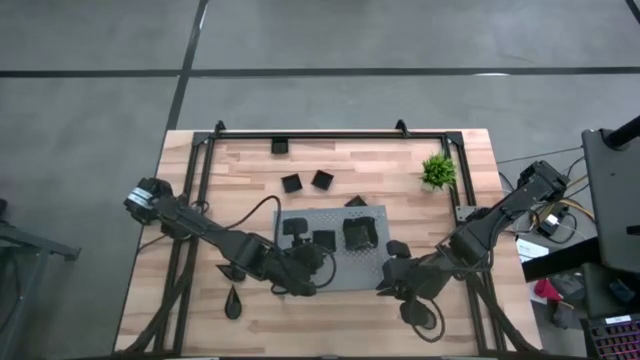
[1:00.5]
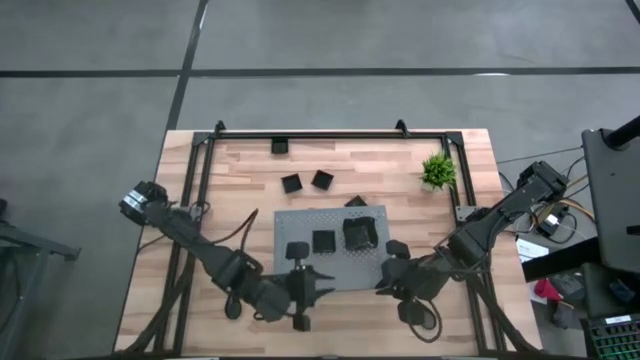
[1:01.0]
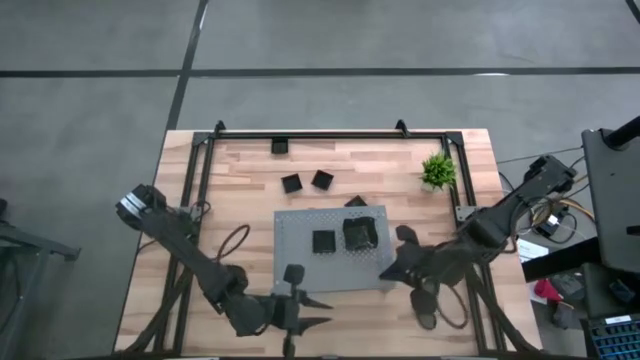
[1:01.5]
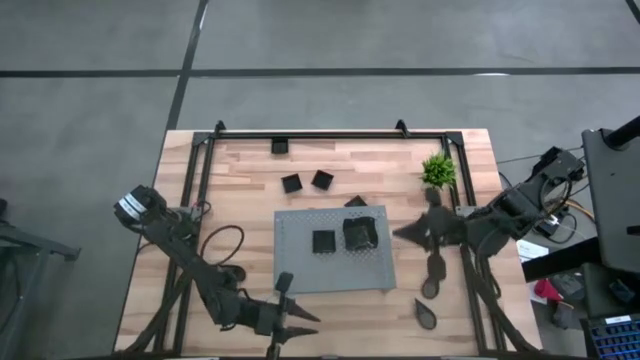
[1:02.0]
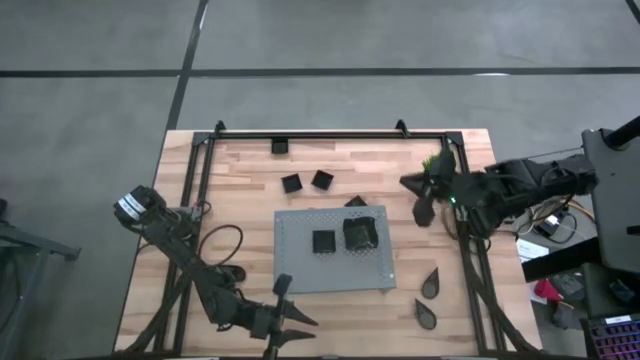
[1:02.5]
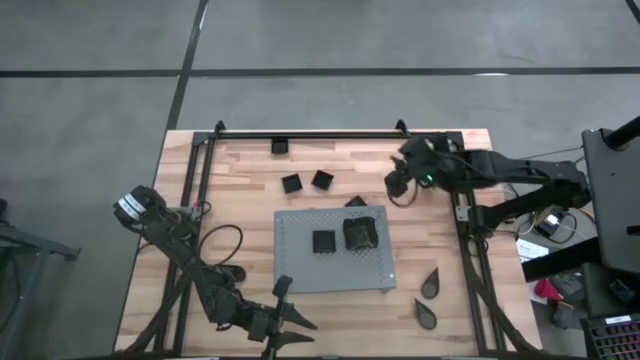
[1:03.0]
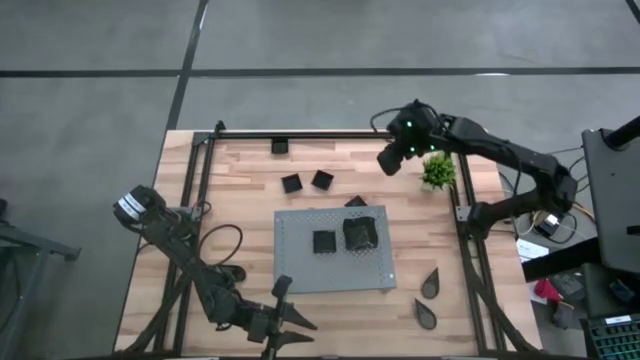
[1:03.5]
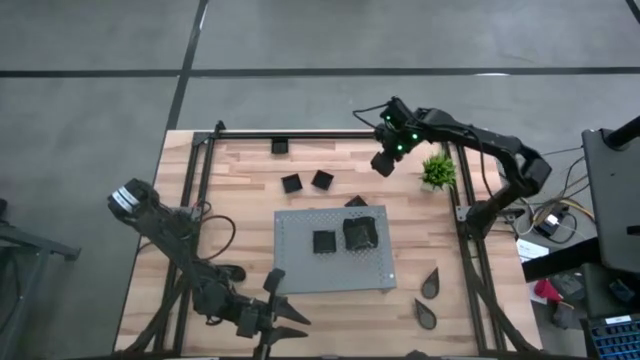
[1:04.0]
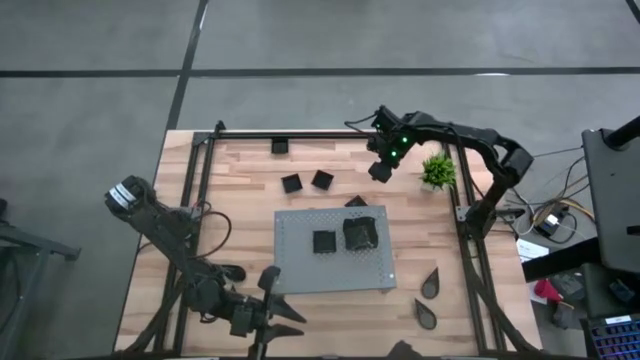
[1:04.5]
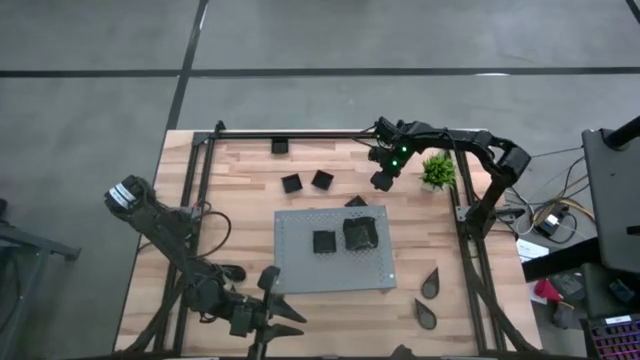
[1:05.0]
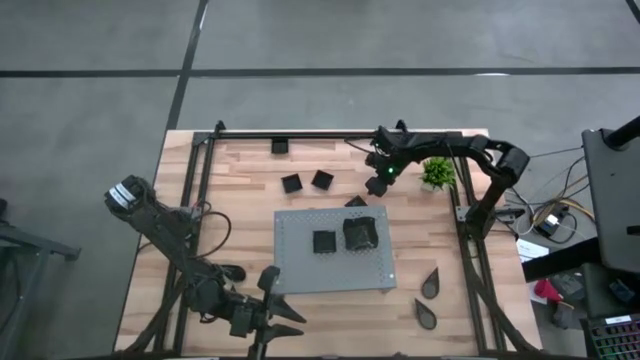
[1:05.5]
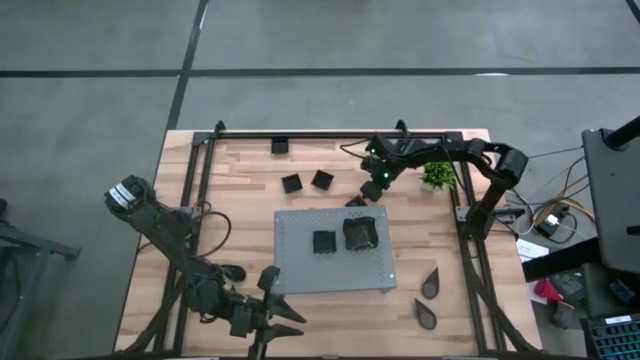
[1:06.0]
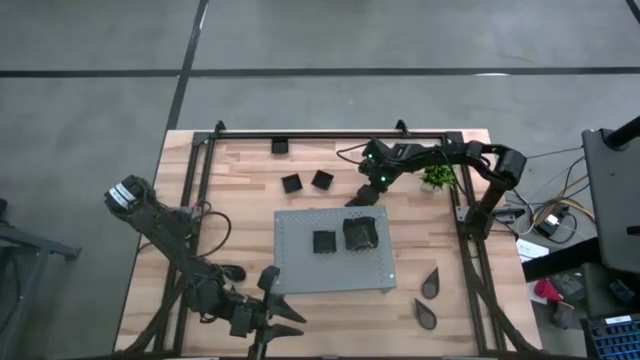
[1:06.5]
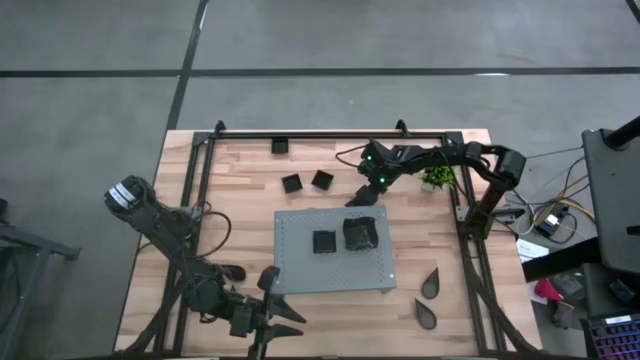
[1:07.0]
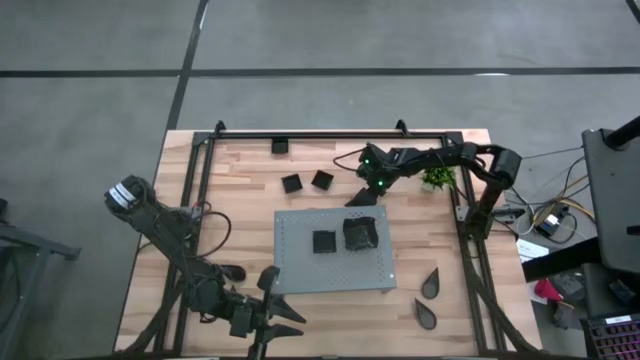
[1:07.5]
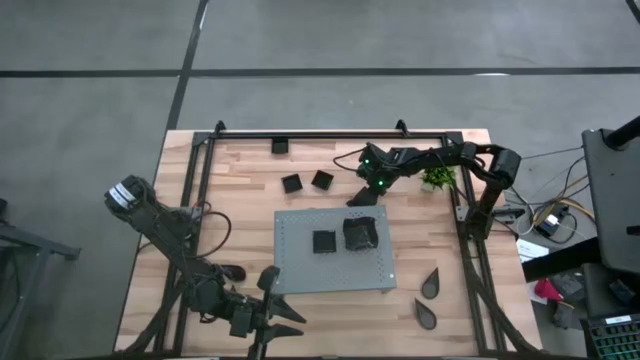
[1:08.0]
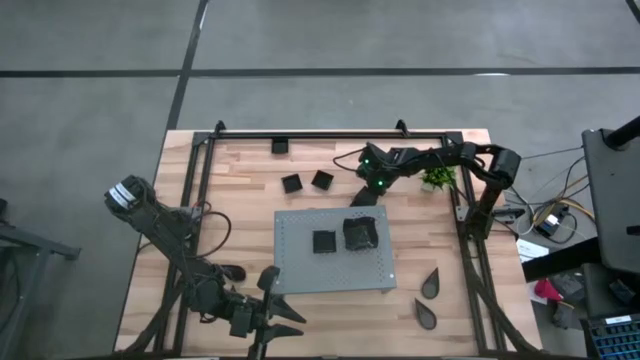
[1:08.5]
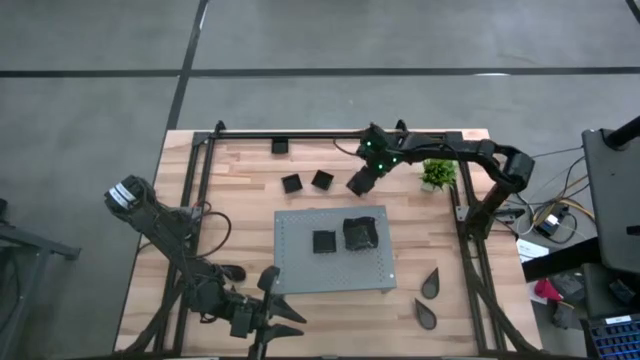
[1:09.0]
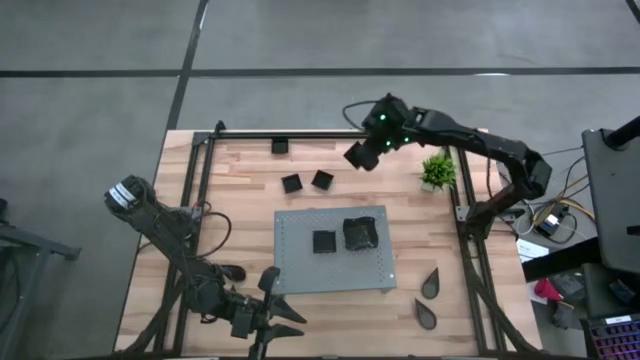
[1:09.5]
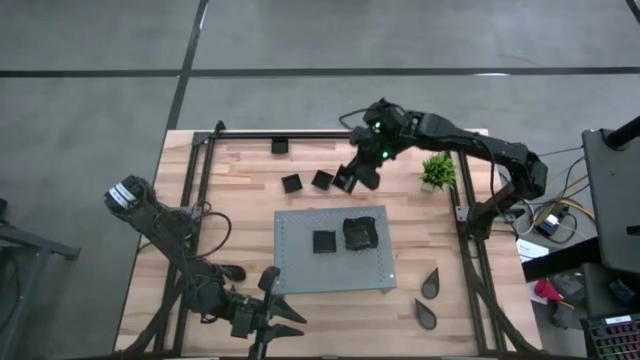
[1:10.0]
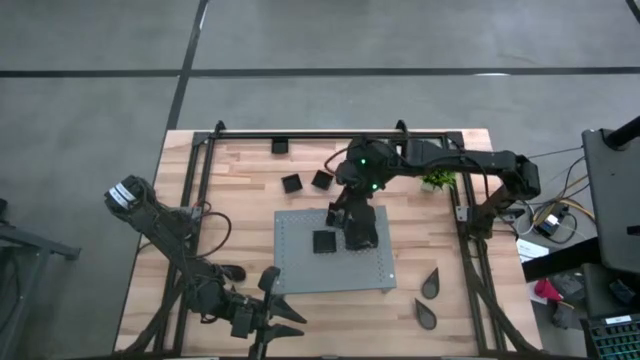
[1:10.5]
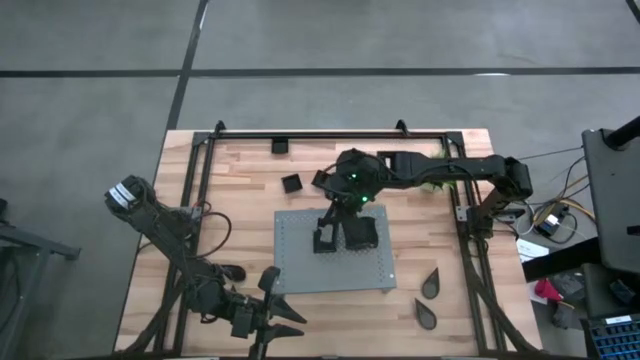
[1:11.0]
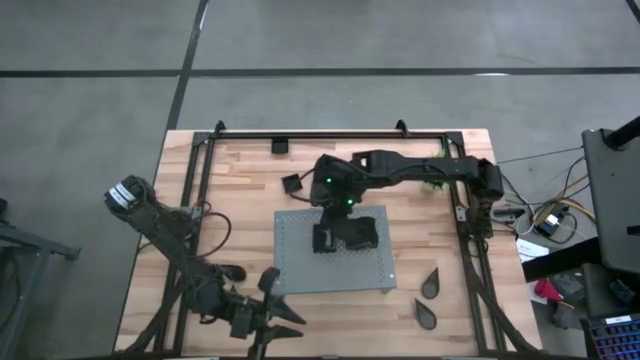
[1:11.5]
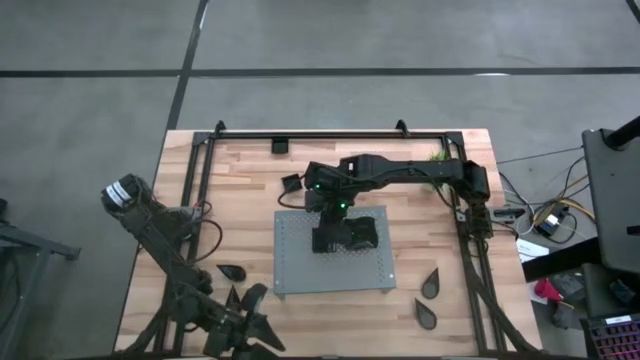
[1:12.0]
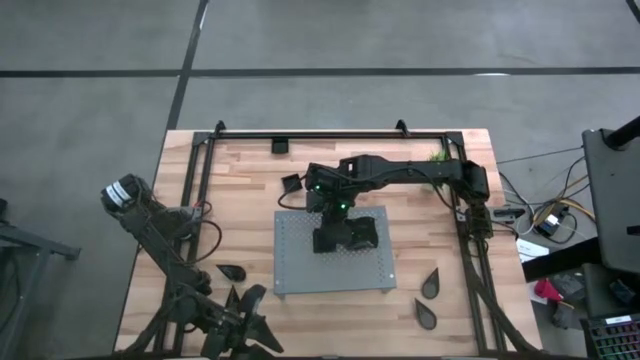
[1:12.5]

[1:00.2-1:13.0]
Task: Pick & Place Mini shaped plates
Stack the square plate on top of the square plate on the shelf

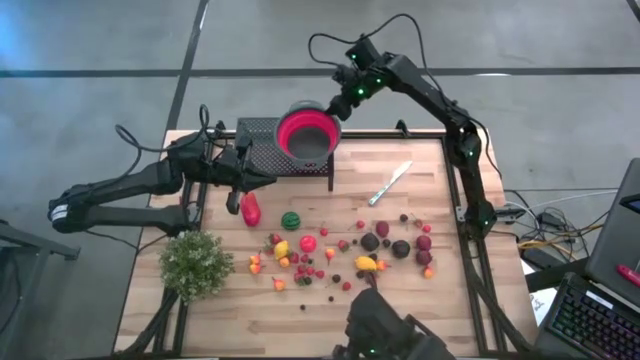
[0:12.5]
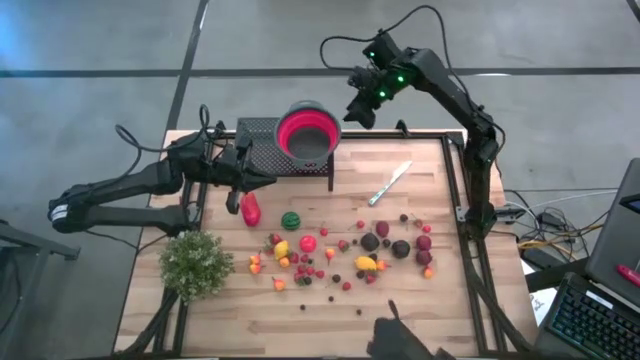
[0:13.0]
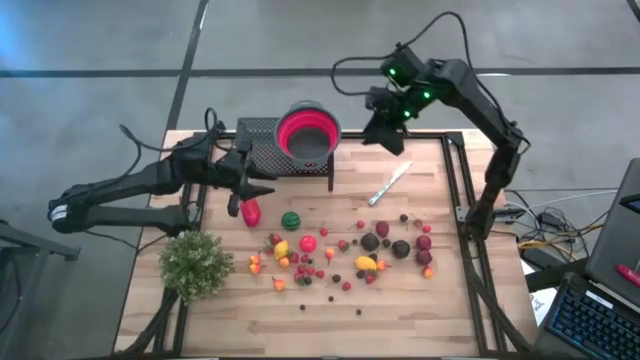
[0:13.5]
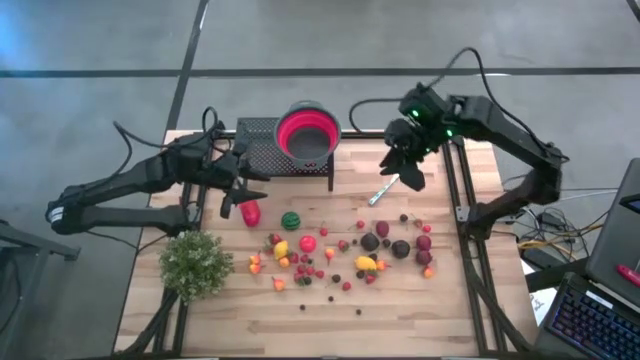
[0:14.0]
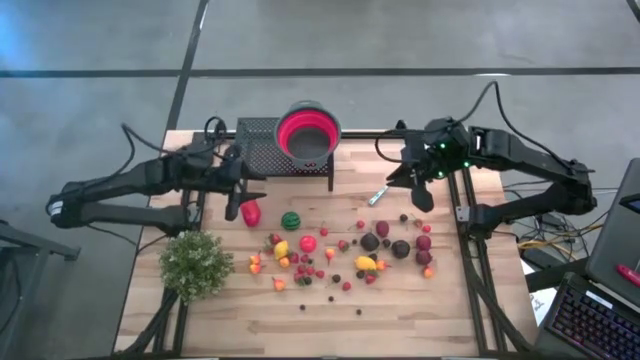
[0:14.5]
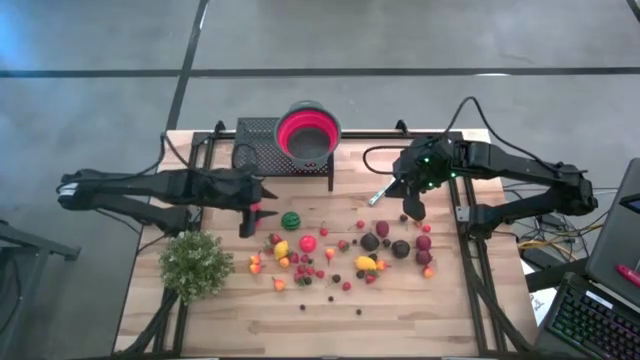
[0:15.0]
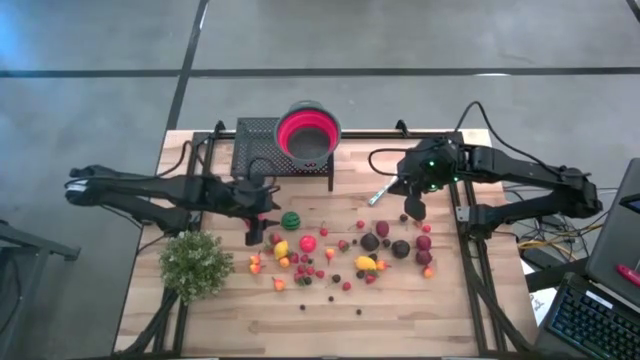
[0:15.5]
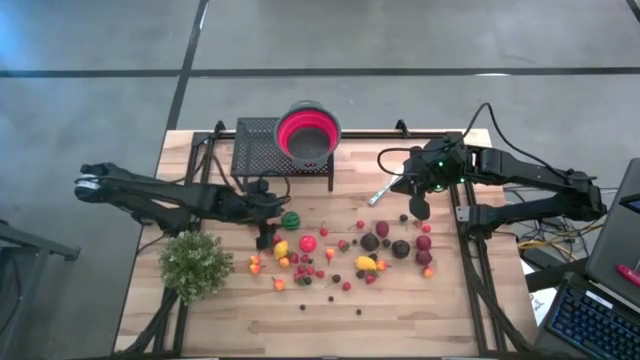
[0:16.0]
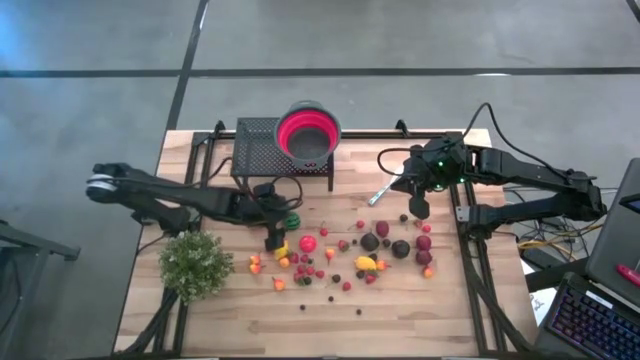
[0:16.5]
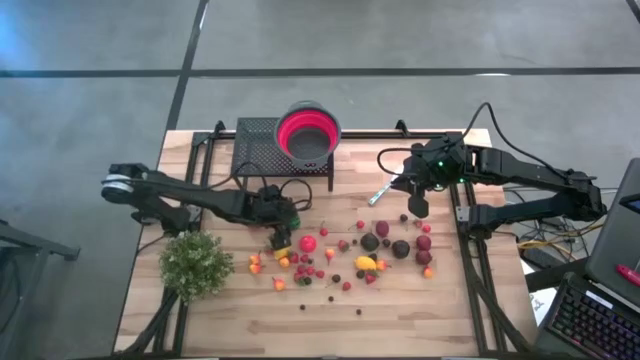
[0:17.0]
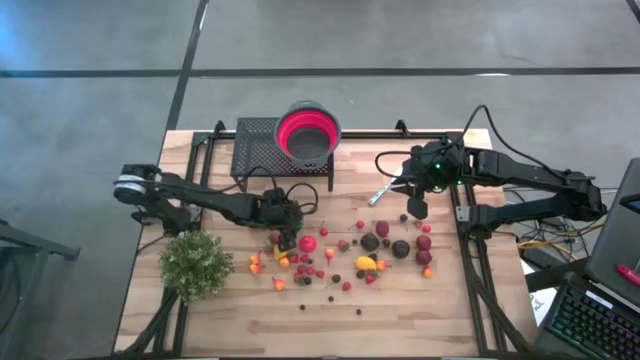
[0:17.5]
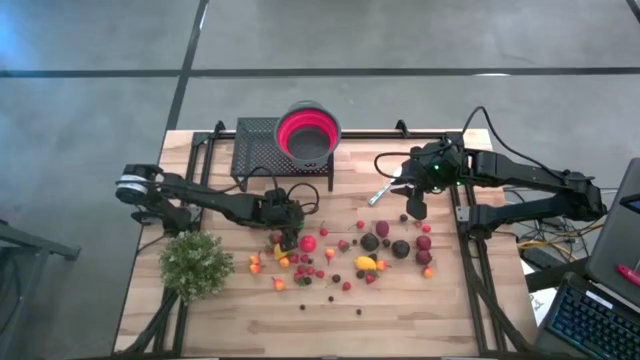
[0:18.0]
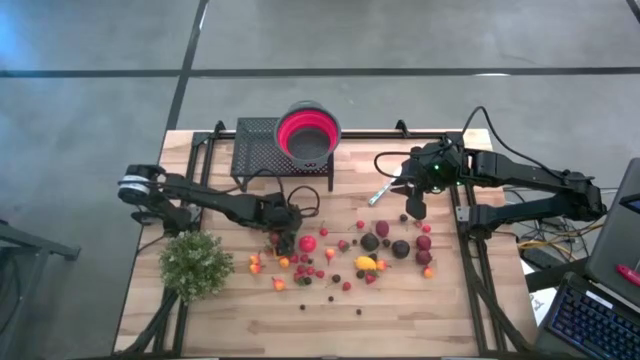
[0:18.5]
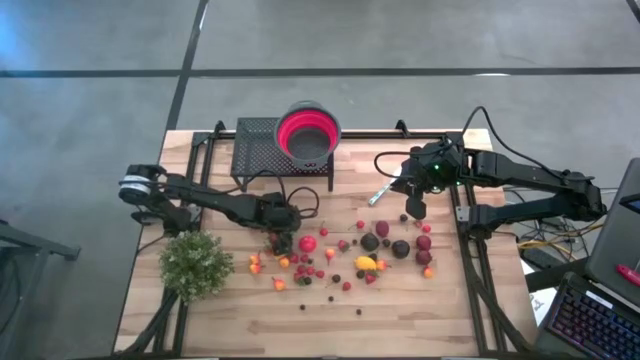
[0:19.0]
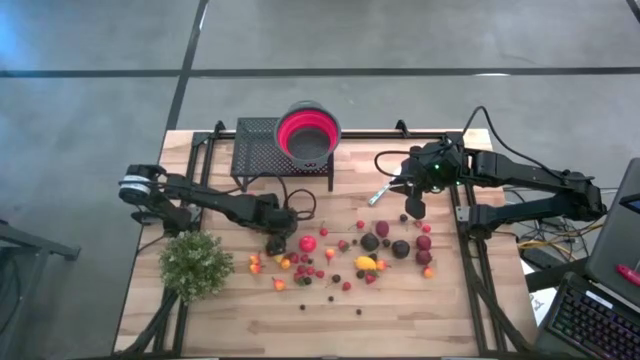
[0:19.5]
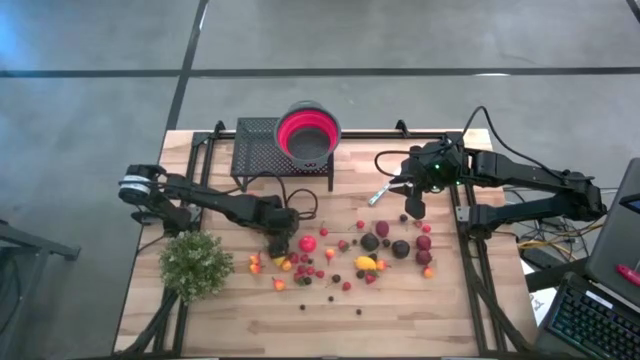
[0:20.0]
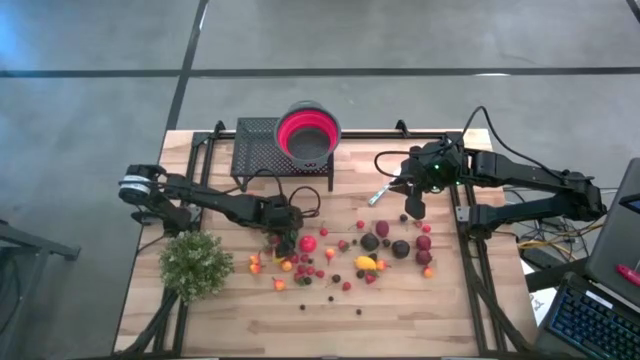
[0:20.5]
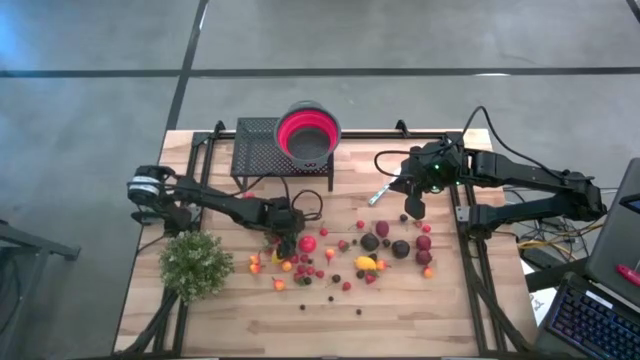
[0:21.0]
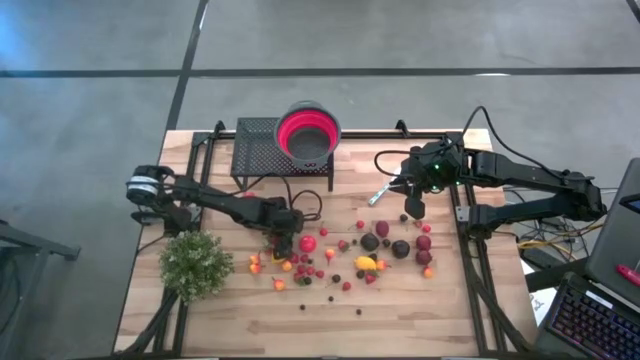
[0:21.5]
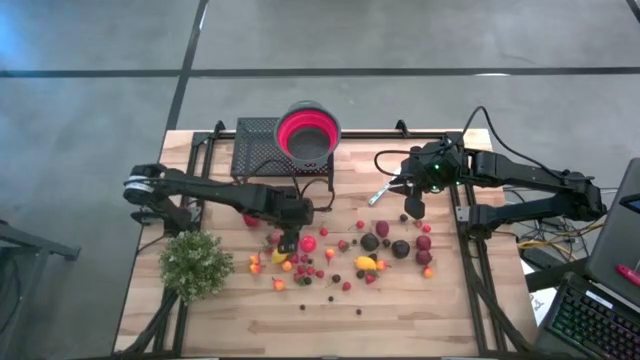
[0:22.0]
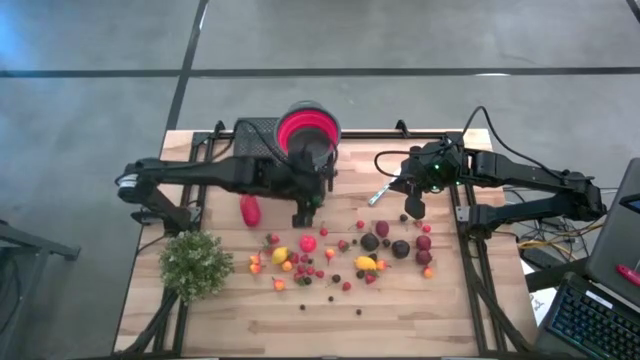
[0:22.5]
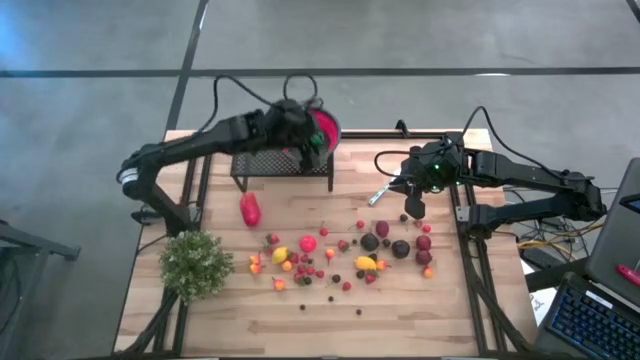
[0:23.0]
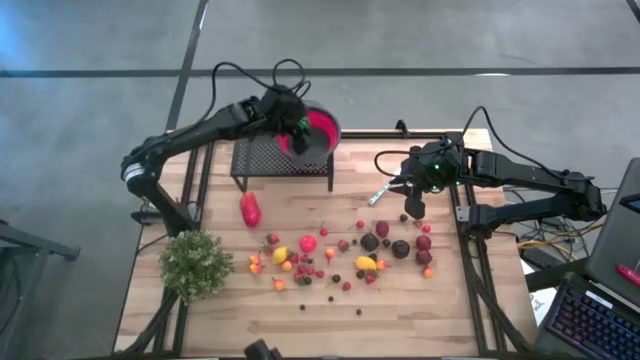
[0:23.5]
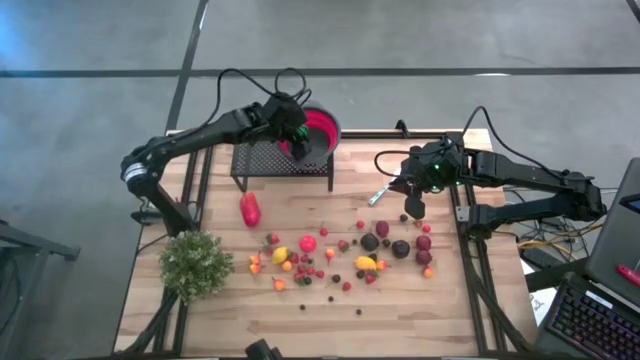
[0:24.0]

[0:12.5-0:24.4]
Task: Pick & Place Fruit
Put the green watermelon into the red gray strainer bowl on the shelf
